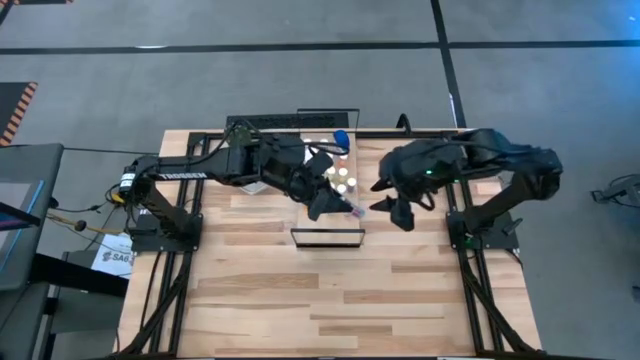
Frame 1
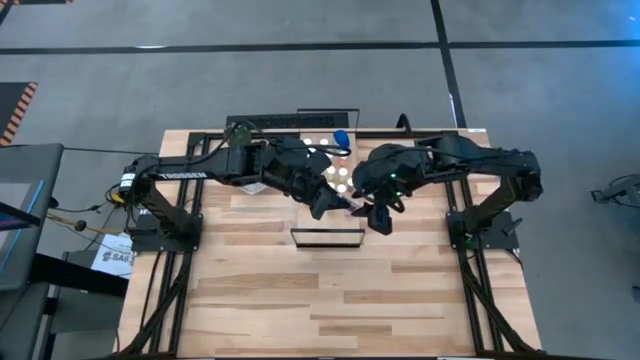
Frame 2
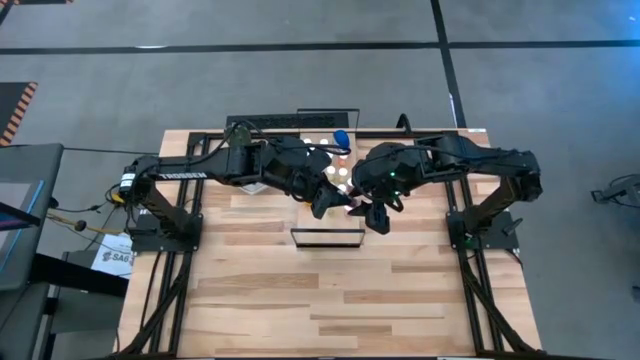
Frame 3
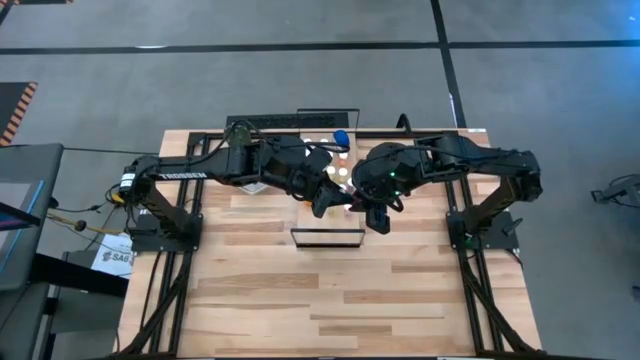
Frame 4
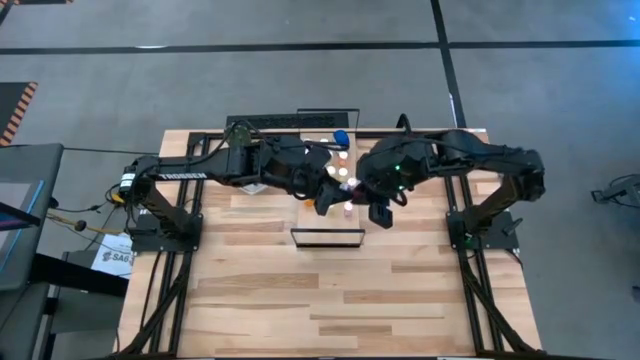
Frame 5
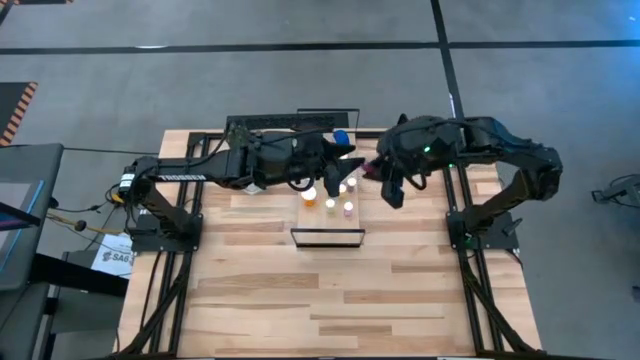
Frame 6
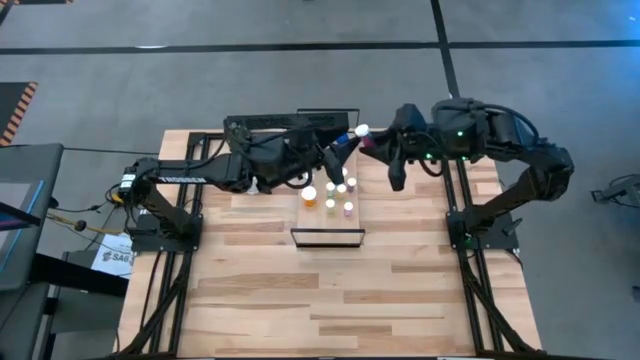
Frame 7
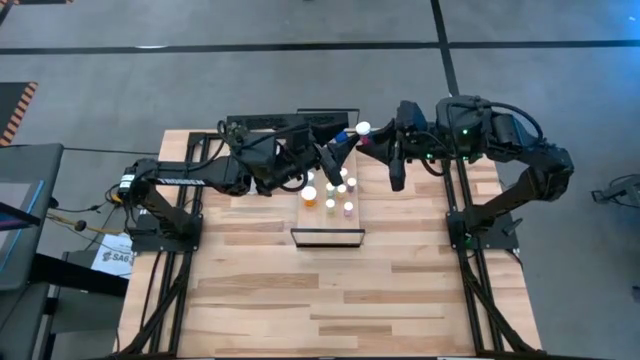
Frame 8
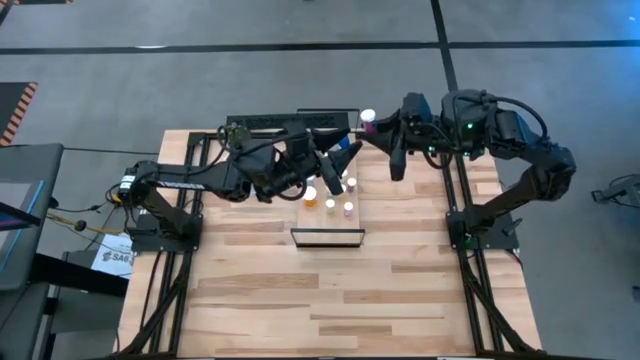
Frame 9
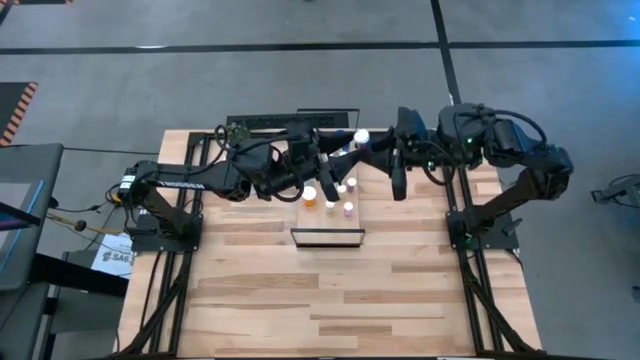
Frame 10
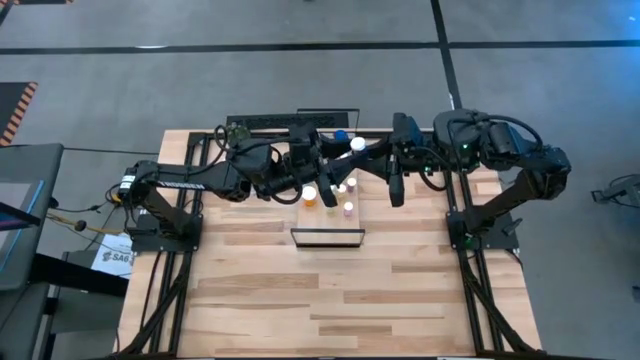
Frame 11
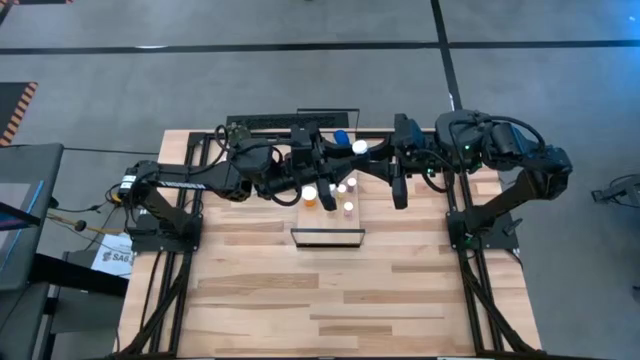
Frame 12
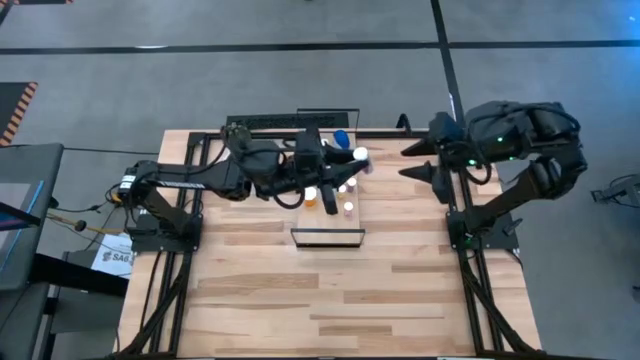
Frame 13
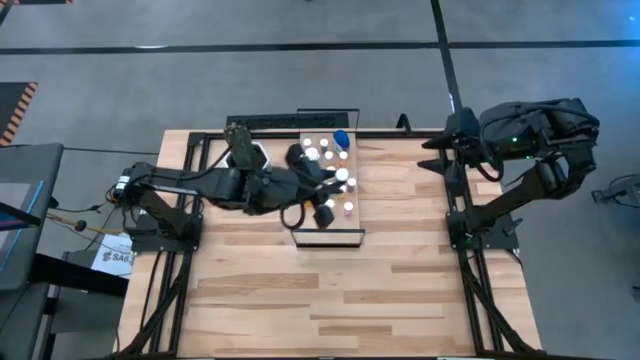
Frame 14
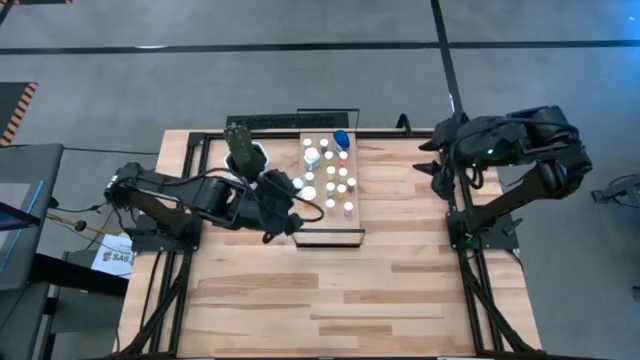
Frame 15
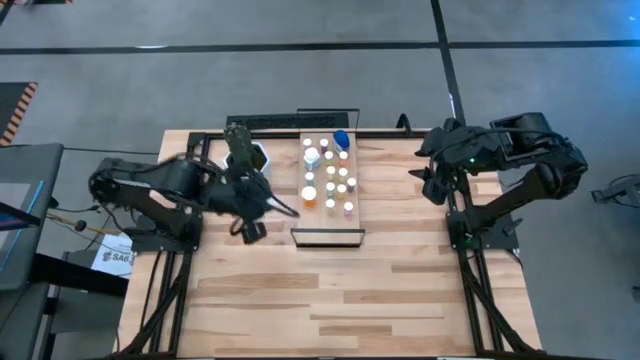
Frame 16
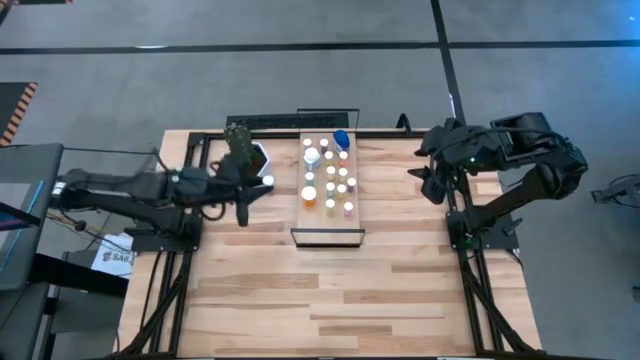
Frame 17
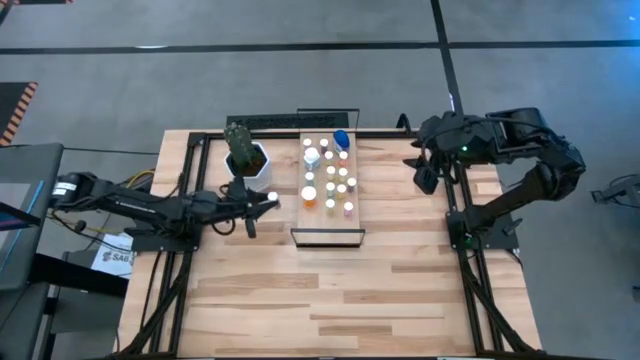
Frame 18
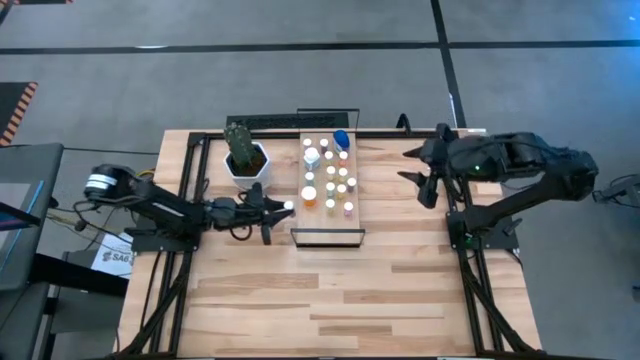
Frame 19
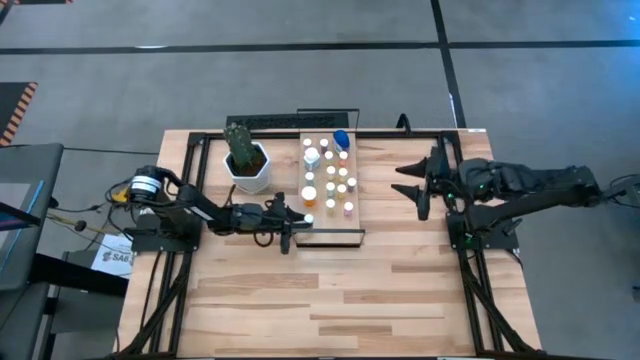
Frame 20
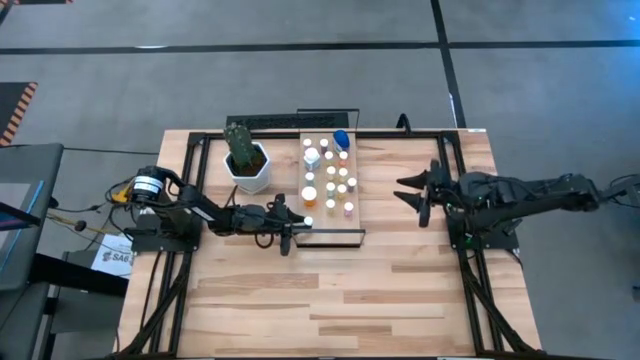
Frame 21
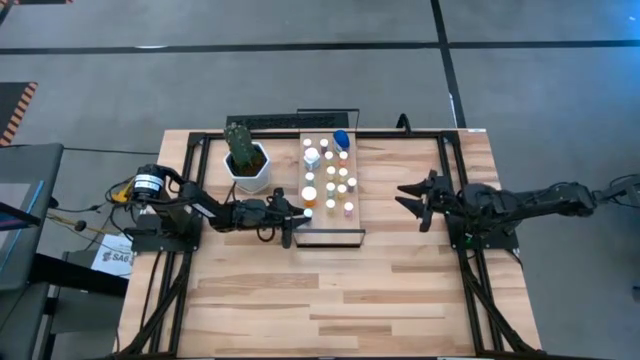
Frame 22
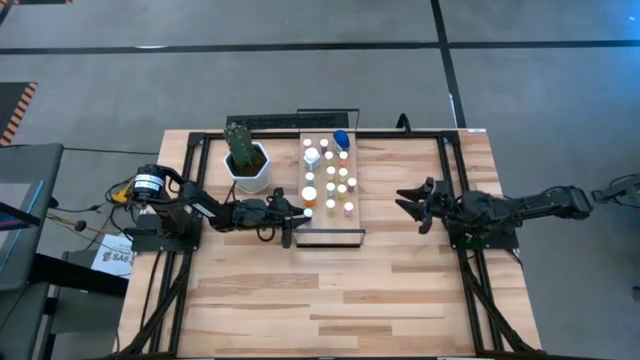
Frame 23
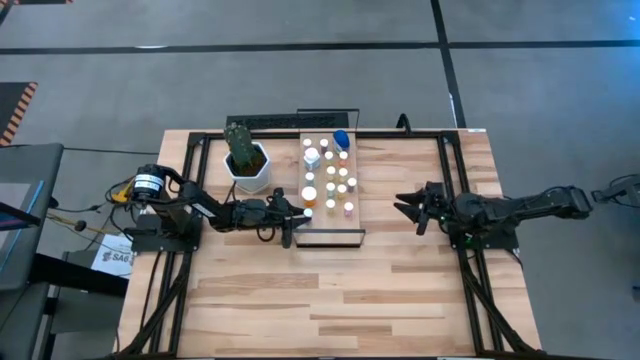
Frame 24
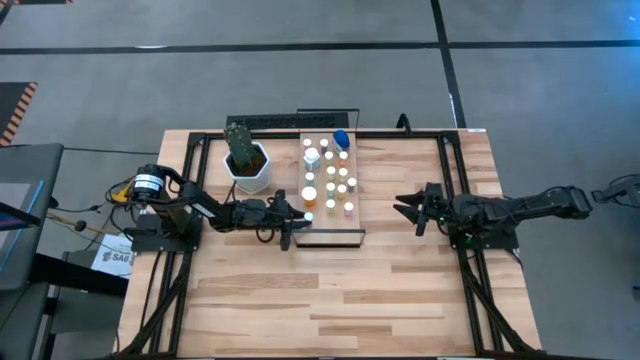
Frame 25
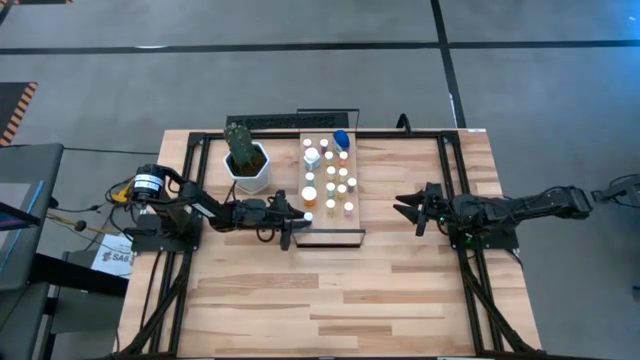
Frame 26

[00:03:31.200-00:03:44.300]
Task: Pick and place medicine bottles onto shelf by color
Put the blue pill bottle on the shelf

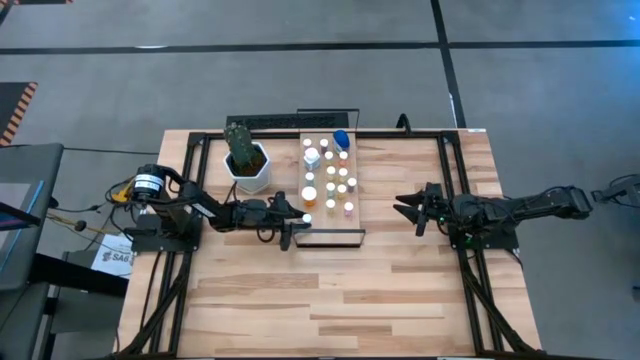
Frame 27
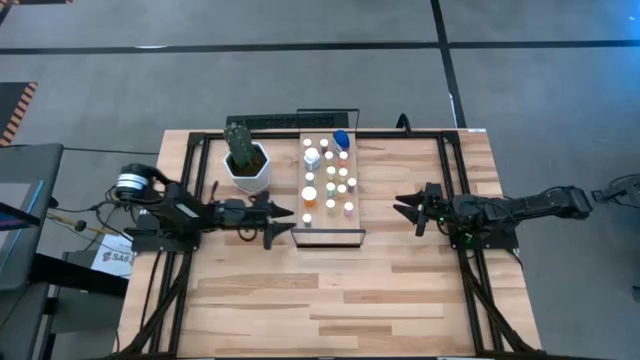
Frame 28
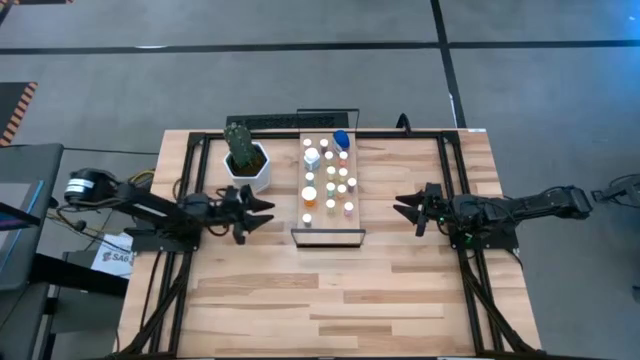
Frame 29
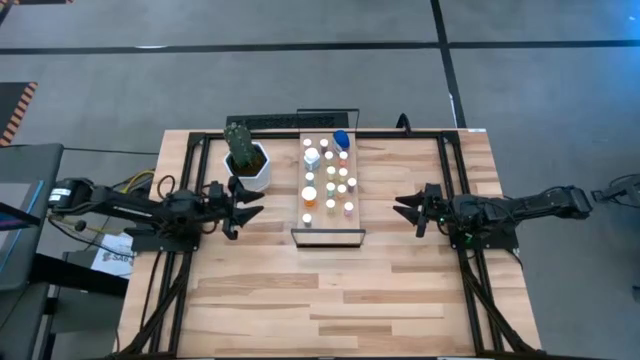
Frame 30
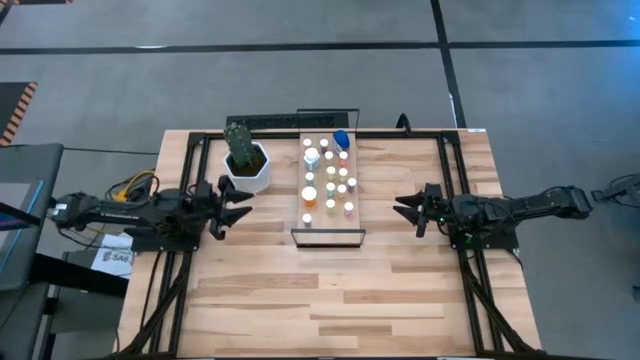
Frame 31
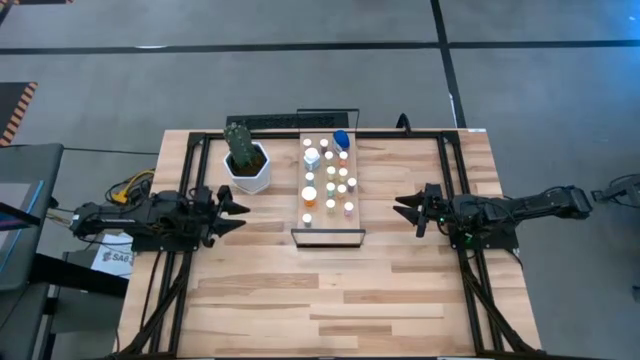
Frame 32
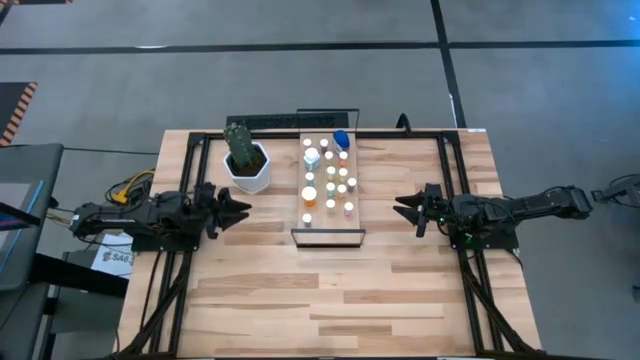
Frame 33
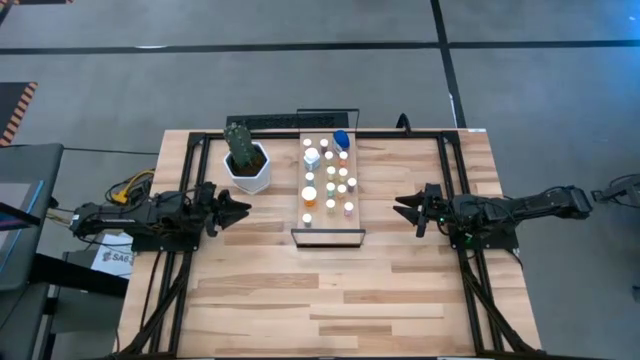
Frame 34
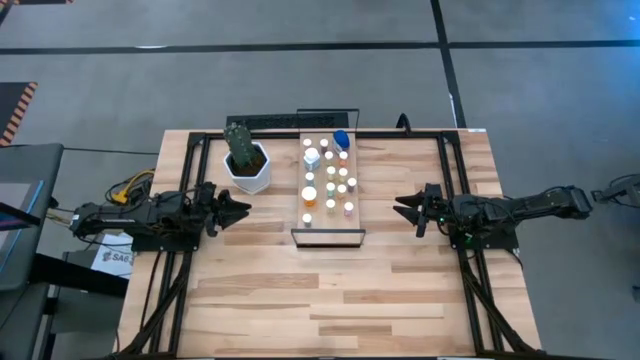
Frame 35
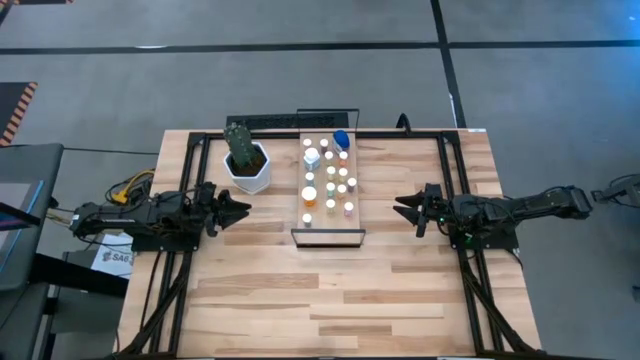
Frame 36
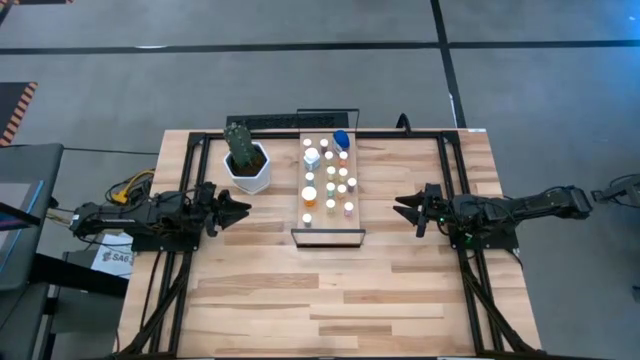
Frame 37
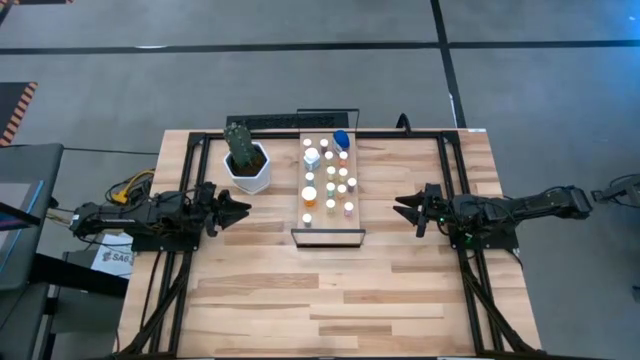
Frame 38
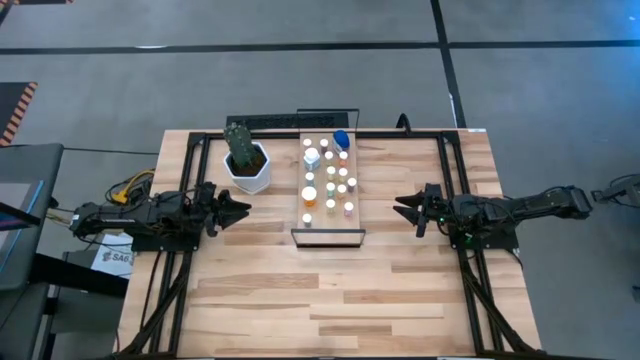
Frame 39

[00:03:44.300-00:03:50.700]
Return to Home Position

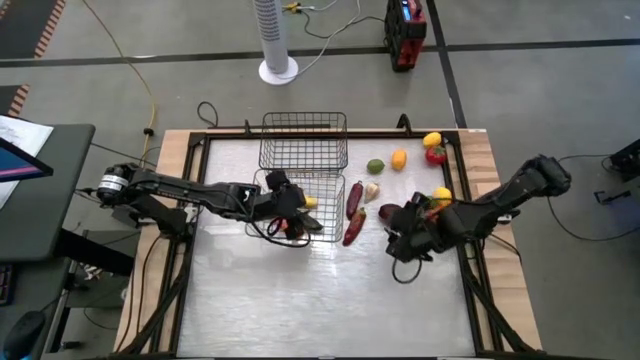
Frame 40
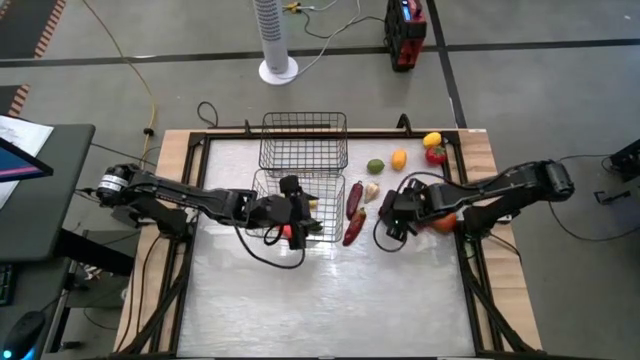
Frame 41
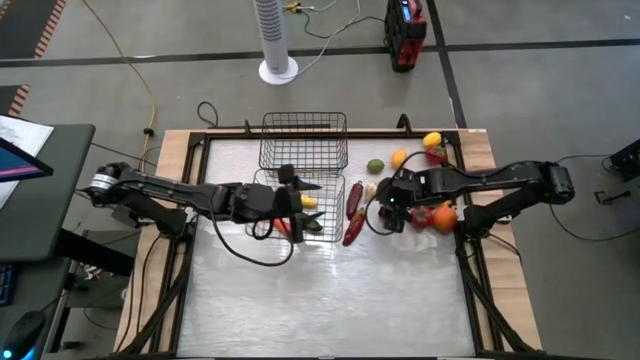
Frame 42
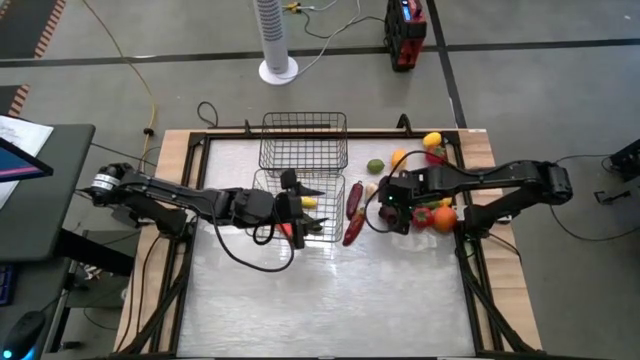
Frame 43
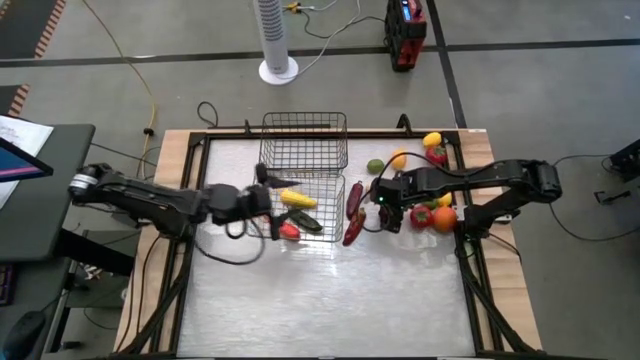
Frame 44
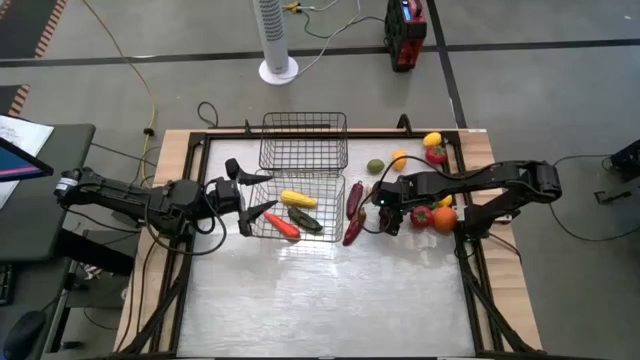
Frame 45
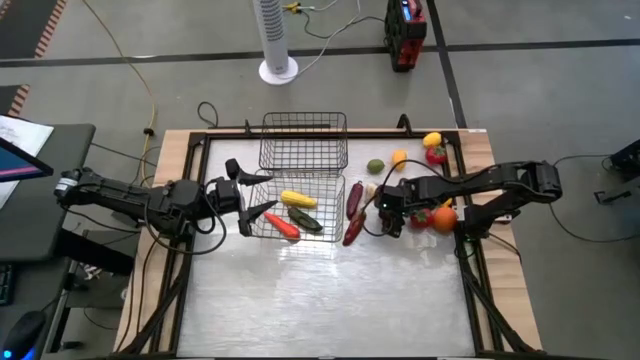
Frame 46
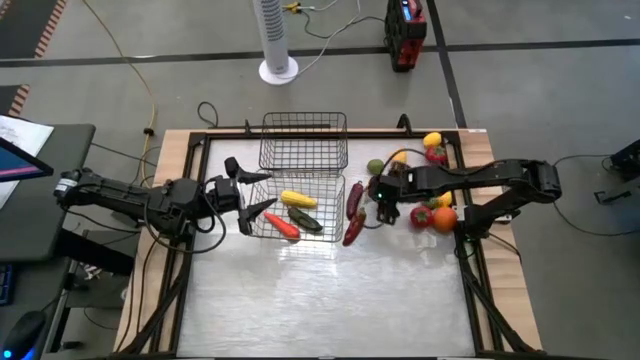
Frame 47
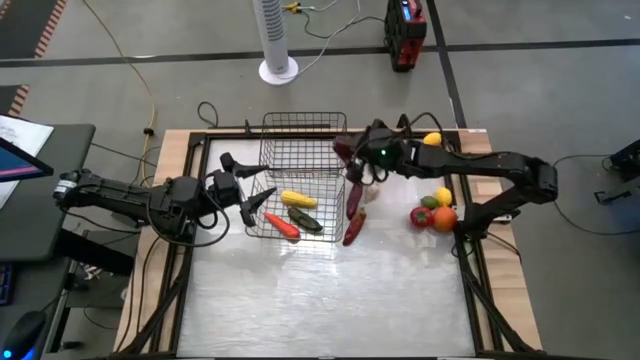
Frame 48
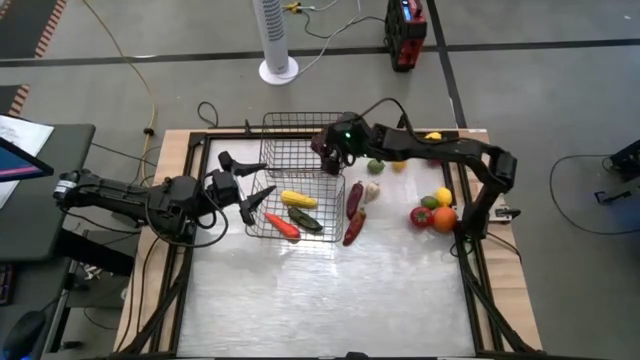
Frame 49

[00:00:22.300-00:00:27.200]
Task: Sort produce into baskets
Put the apple into the top wire basket
